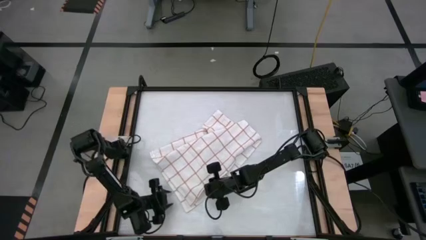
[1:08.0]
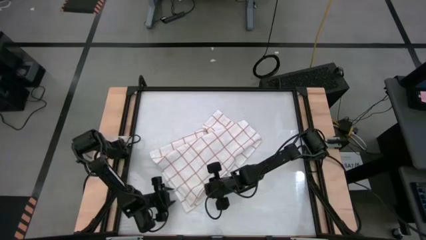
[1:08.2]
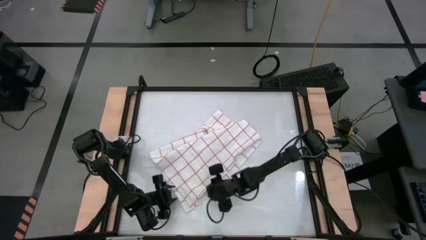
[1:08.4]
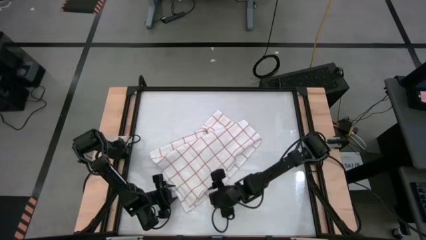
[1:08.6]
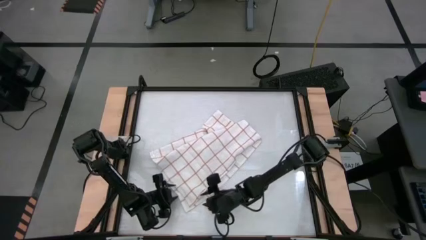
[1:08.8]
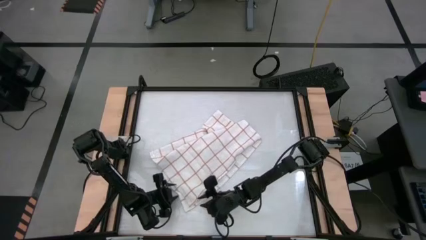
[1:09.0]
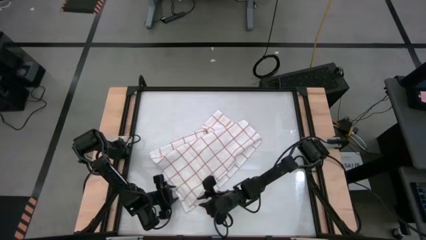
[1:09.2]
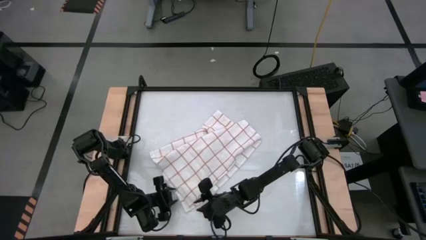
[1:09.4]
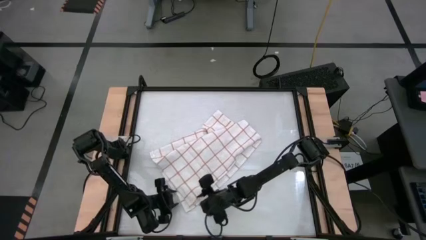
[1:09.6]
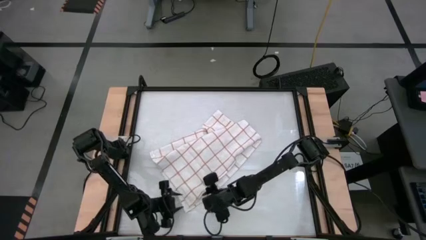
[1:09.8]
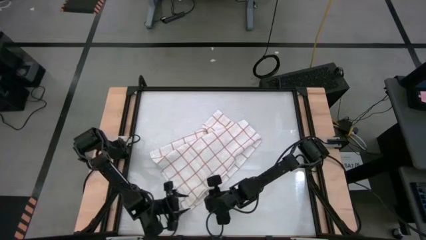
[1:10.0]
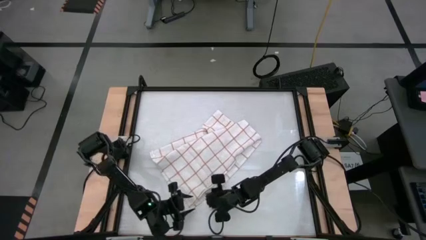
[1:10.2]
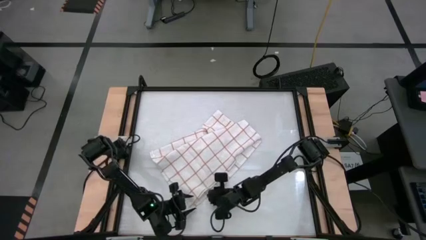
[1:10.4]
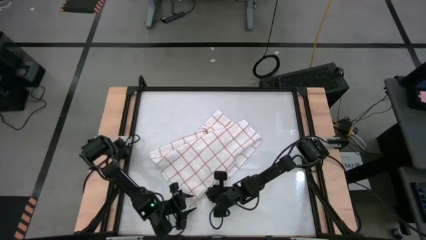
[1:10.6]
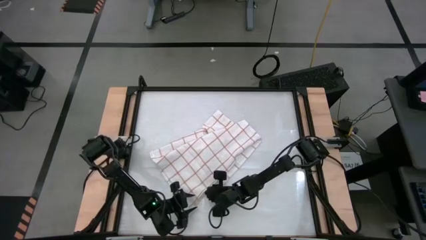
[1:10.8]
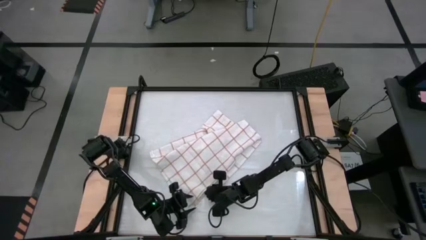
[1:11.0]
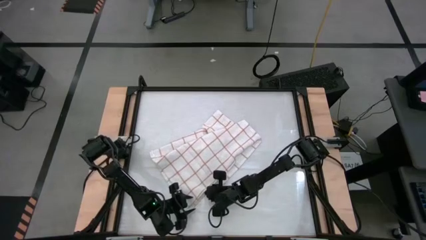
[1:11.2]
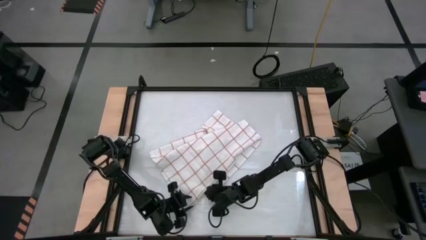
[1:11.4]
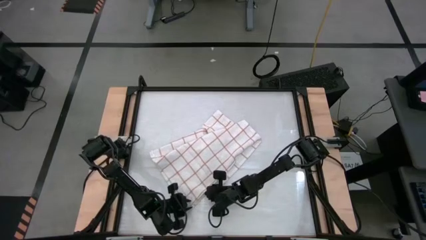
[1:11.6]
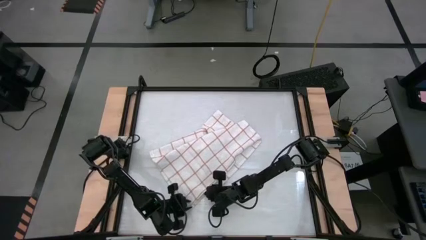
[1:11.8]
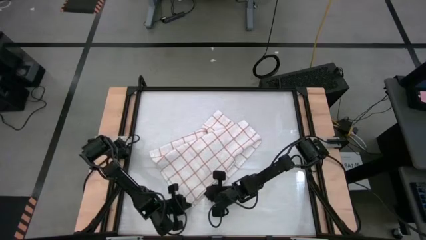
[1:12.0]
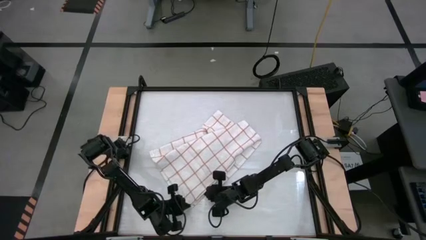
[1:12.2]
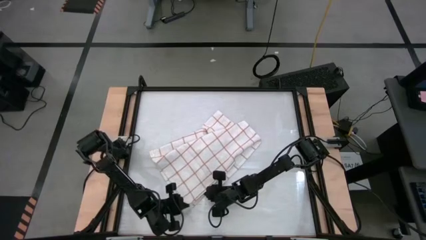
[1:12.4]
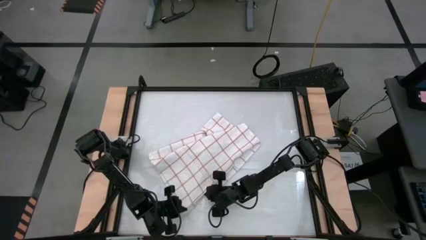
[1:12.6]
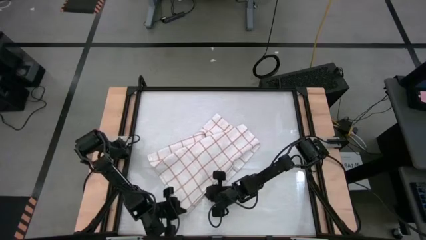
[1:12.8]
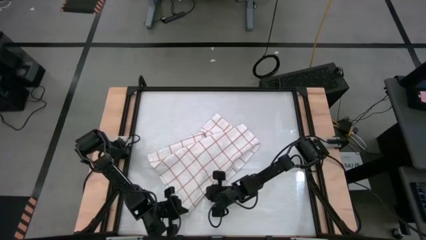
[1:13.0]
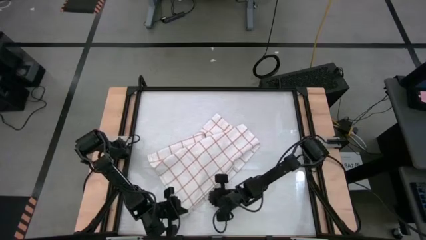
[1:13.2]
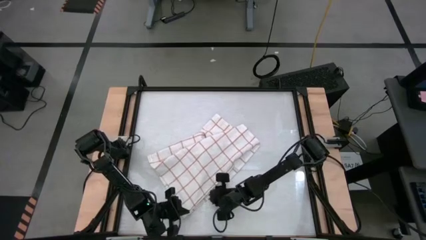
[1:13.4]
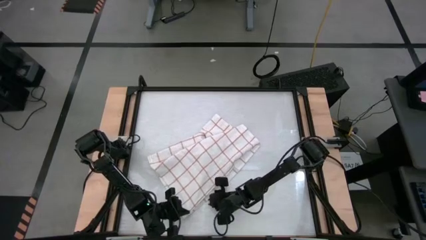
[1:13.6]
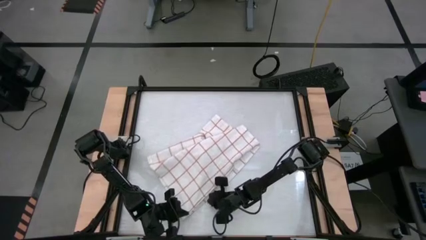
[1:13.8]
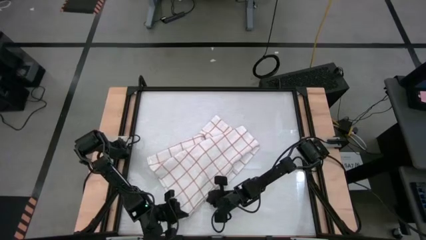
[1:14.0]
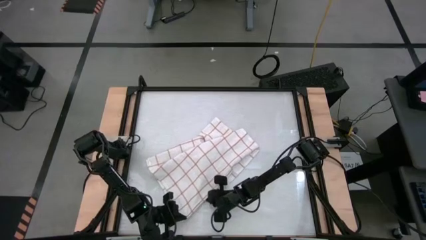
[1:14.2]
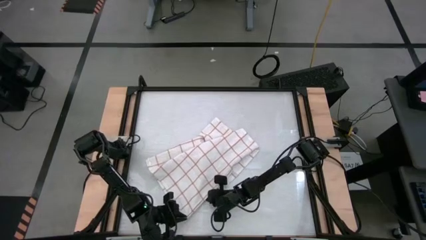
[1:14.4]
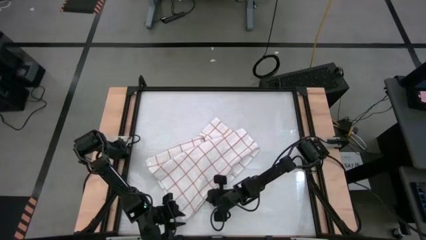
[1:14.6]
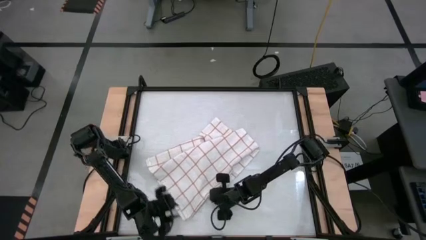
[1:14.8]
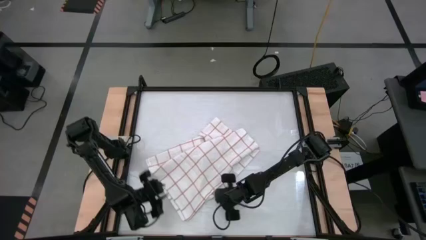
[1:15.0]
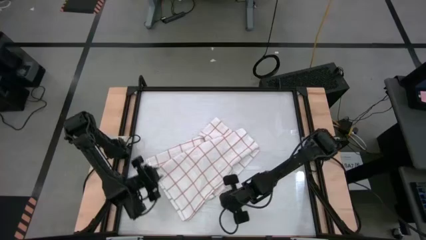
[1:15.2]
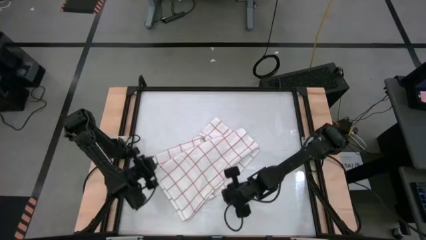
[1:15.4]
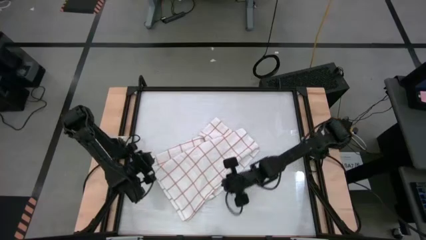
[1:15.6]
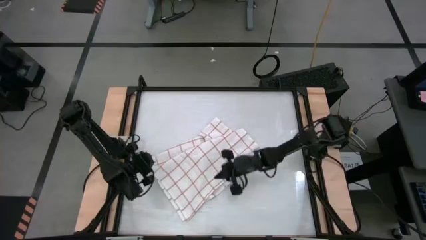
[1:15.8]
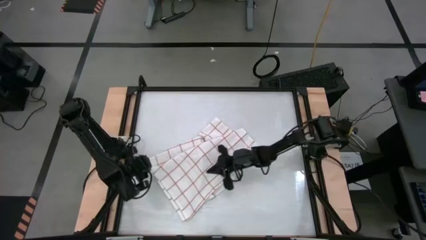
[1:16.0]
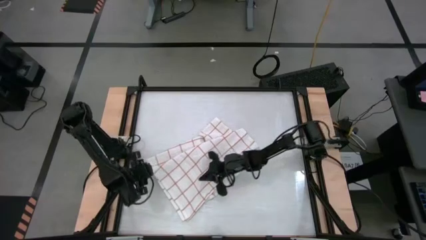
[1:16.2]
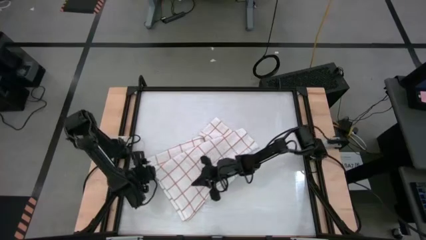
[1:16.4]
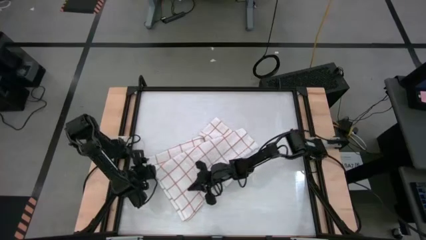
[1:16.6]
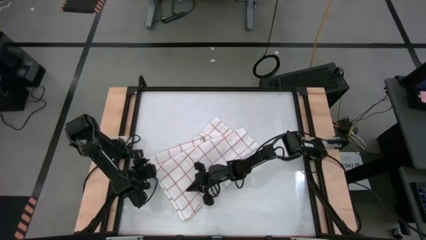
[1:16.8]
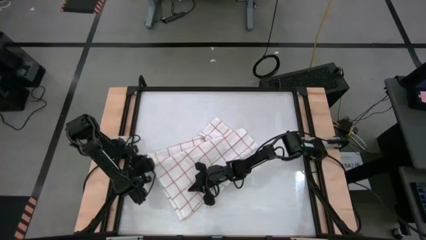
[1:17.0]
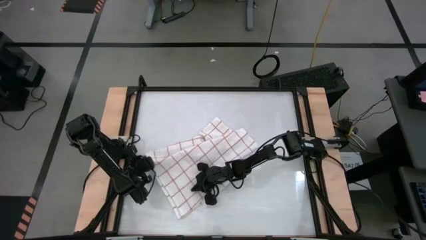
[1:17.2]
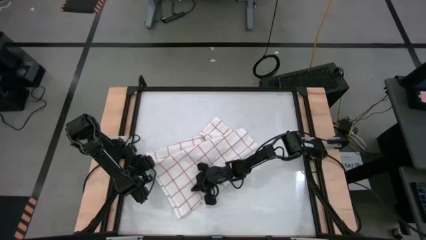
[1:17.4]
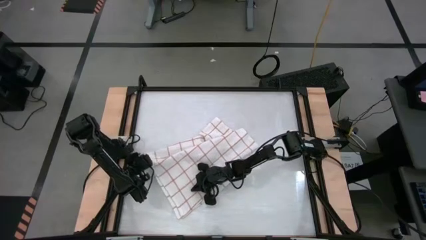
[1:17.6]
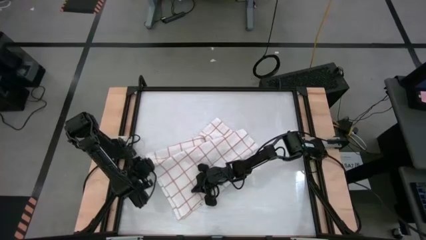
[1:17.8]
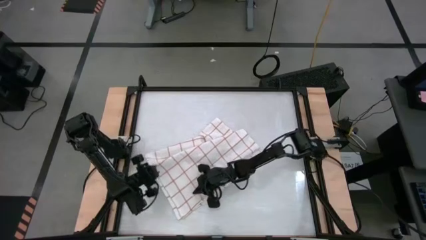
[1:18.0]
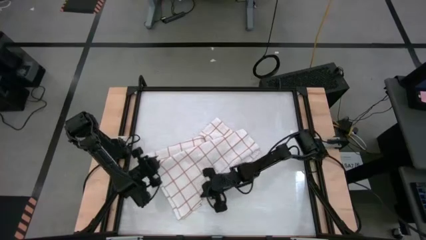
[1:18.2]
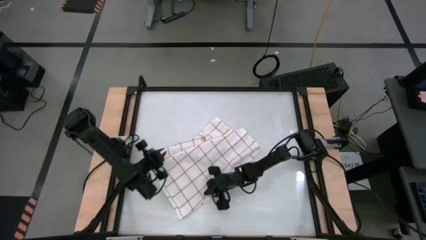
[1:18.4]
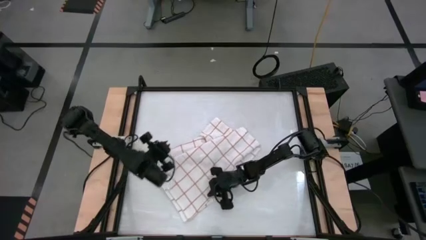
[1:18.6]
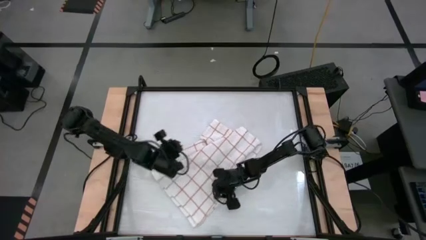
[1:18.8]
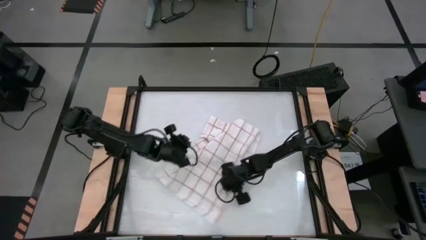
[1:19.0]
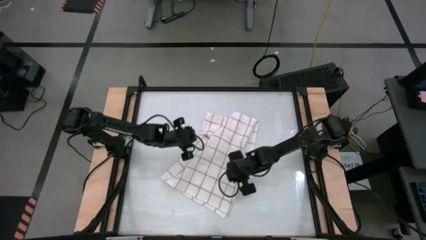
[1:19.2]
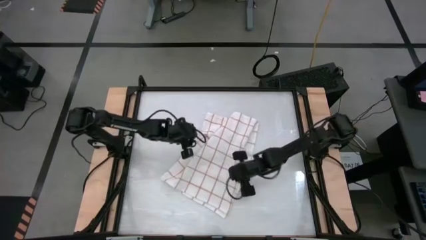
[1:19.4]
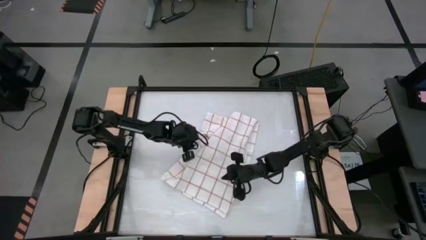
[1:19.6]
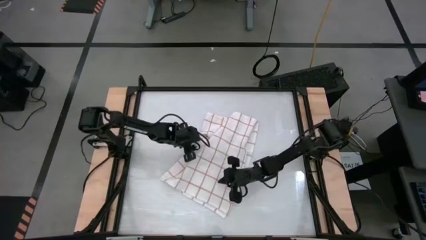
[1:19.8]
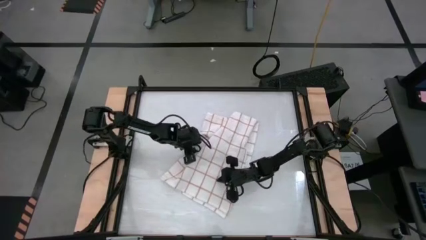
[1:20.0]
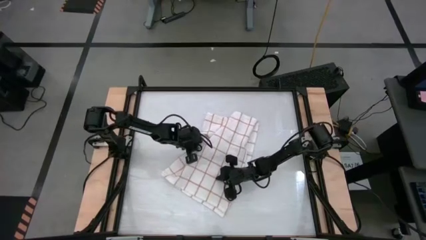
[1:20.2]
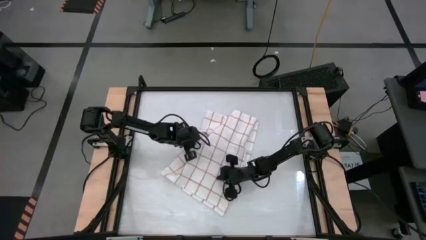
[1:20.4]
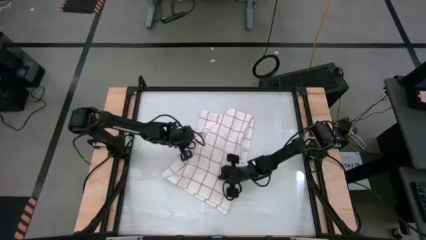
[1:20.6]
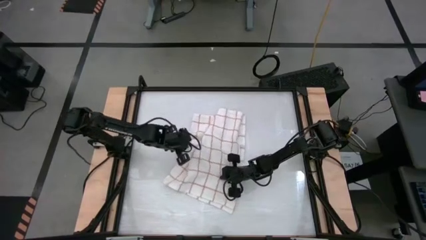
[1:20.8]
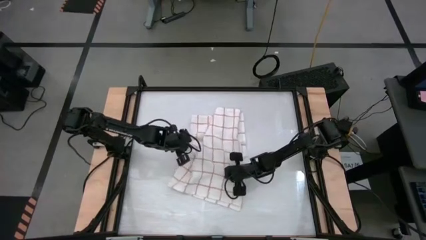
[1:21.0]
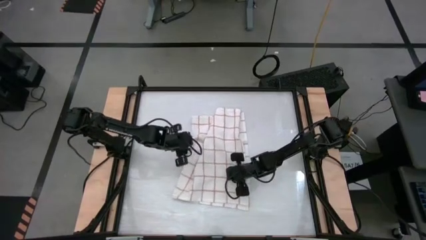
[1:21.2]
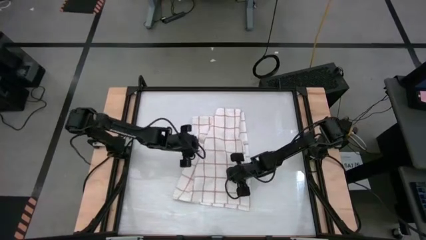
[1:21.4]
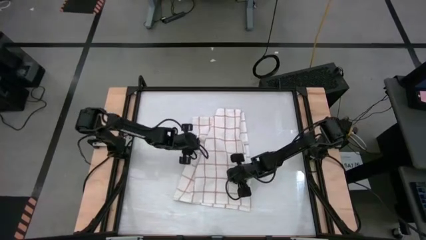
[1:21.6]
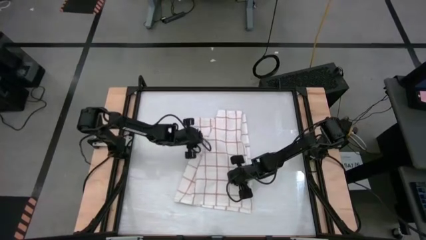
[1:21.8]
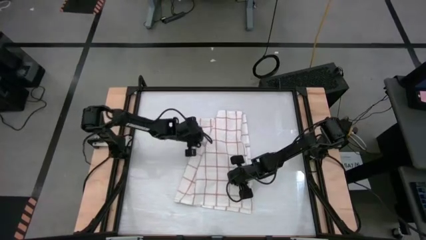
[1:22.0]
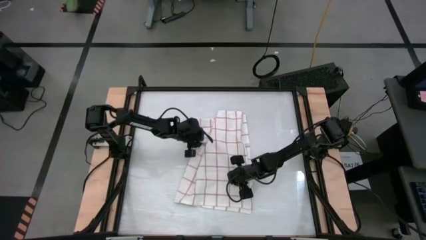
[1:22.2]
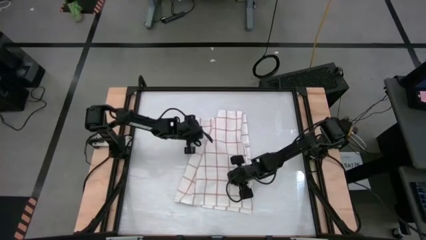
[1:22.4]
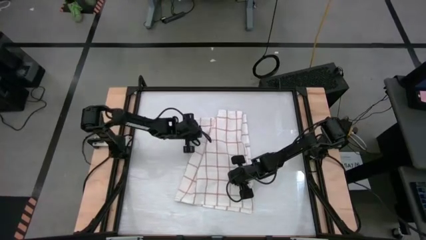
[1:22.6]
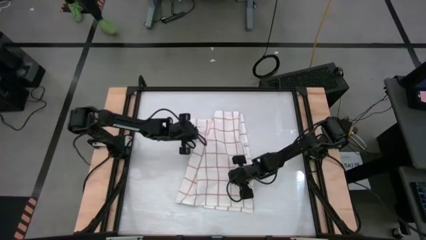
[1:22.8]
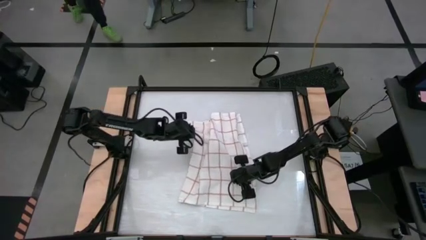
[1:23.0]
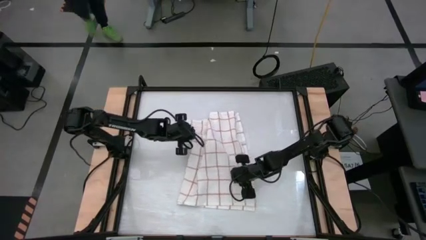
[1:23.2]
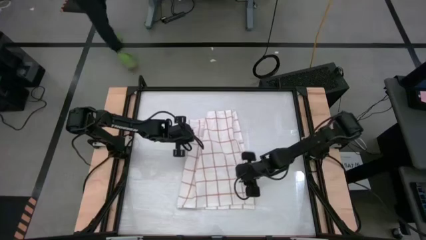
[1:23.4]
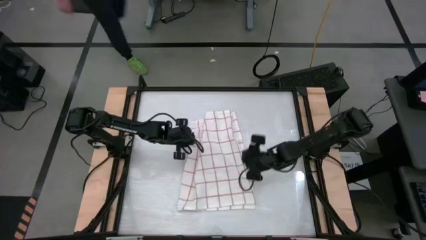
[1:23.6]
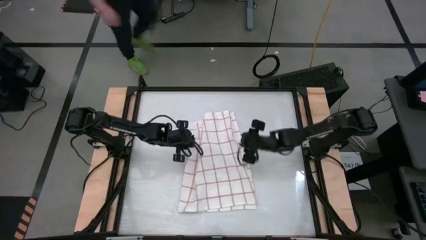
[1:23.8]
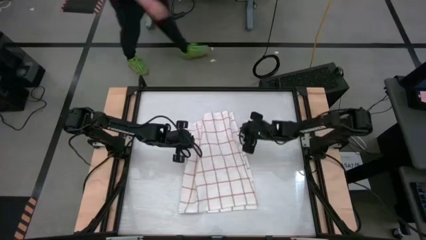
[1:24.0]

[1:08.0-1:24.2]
Task: Roll towel
Fold the white checkered towel
